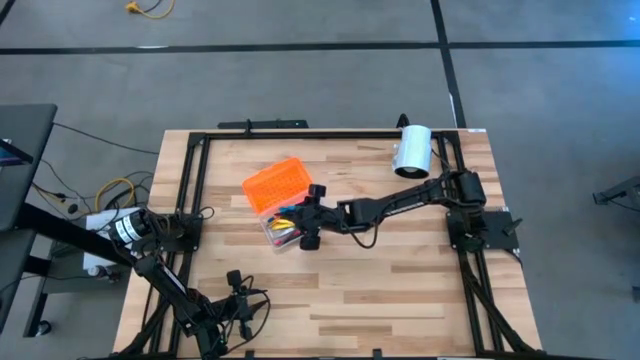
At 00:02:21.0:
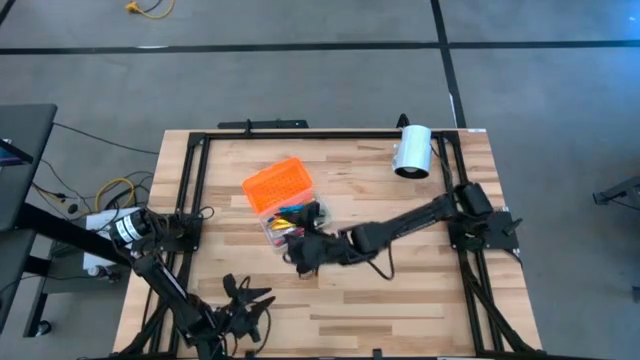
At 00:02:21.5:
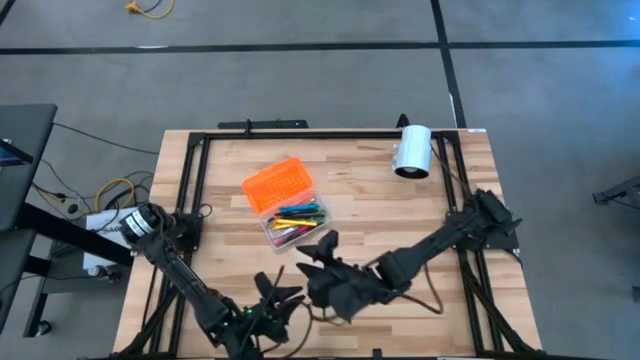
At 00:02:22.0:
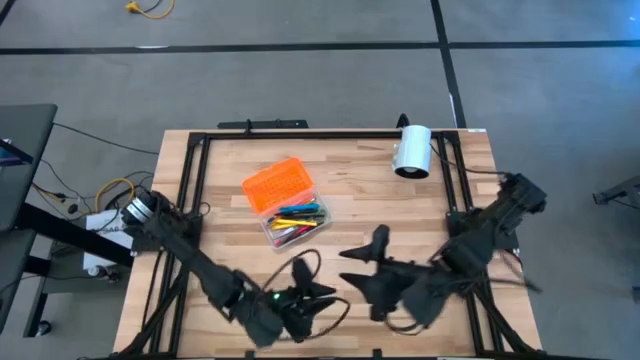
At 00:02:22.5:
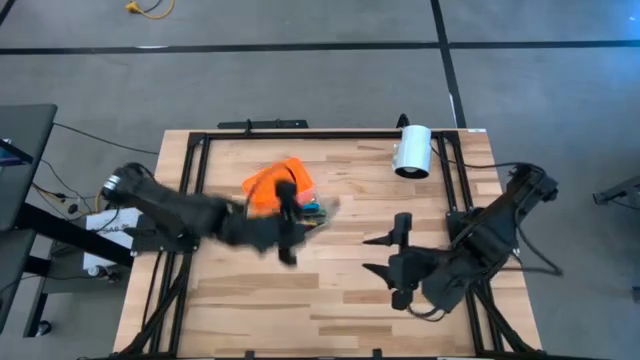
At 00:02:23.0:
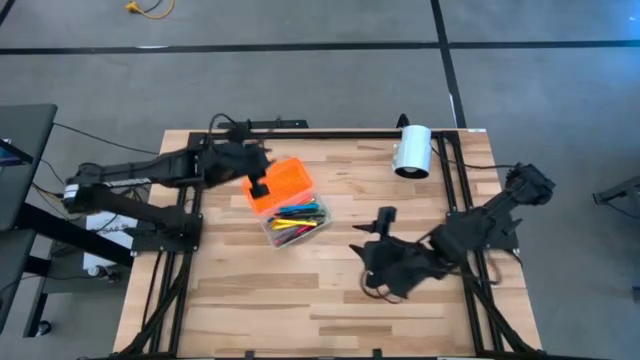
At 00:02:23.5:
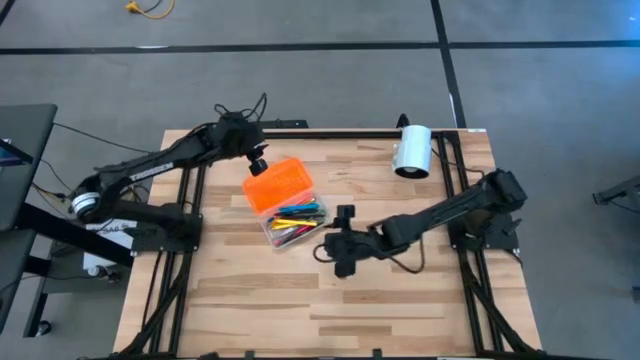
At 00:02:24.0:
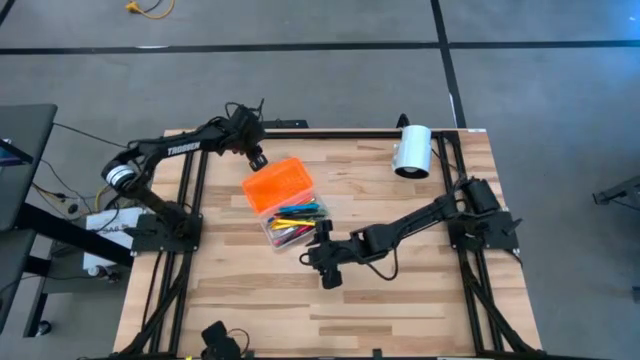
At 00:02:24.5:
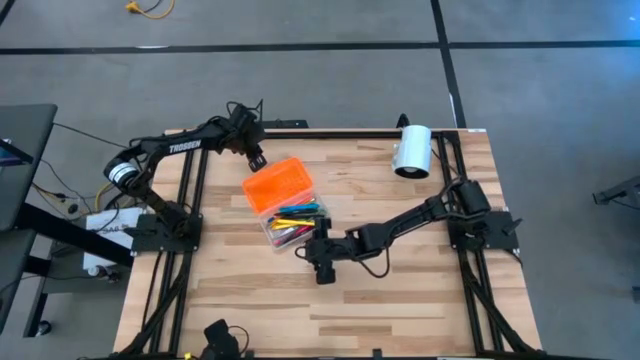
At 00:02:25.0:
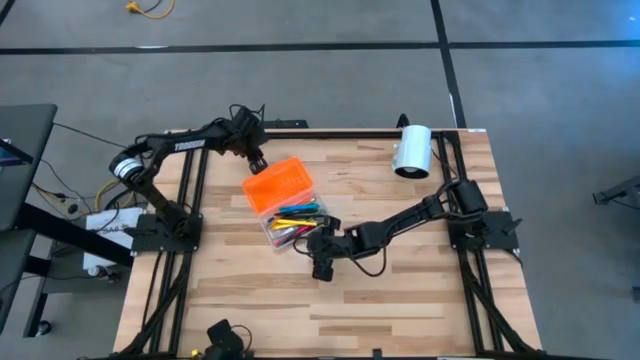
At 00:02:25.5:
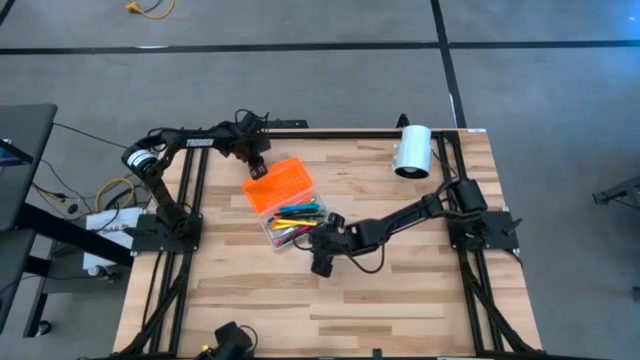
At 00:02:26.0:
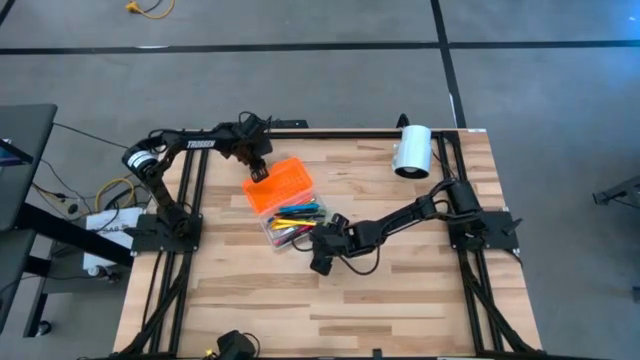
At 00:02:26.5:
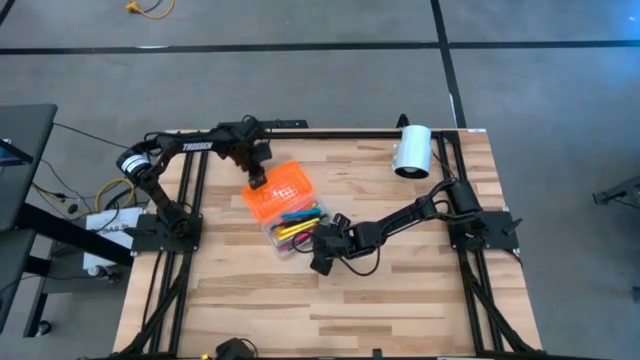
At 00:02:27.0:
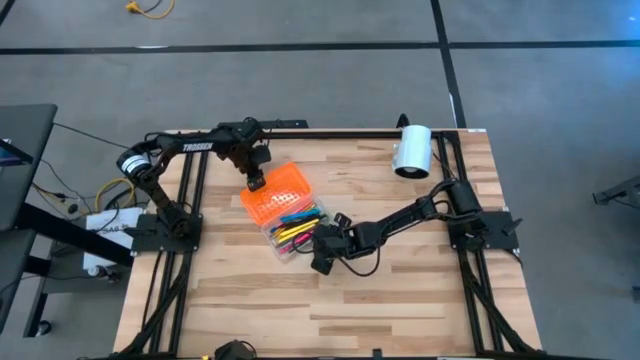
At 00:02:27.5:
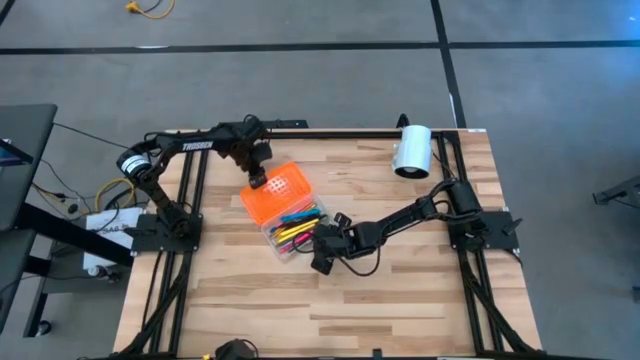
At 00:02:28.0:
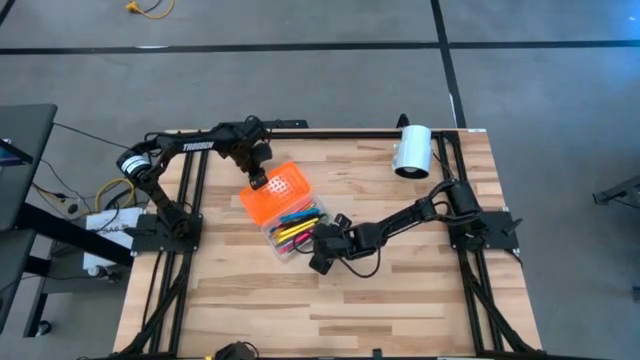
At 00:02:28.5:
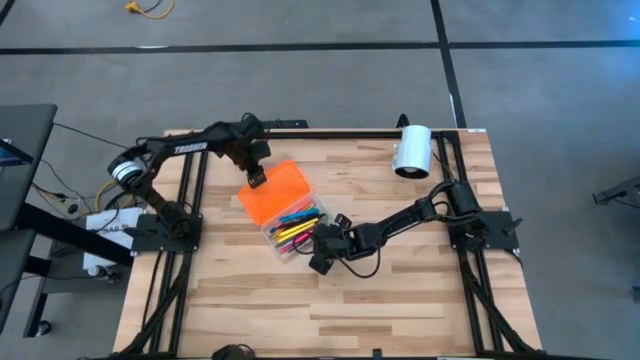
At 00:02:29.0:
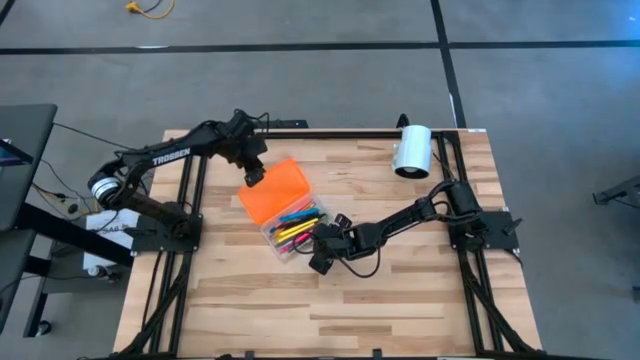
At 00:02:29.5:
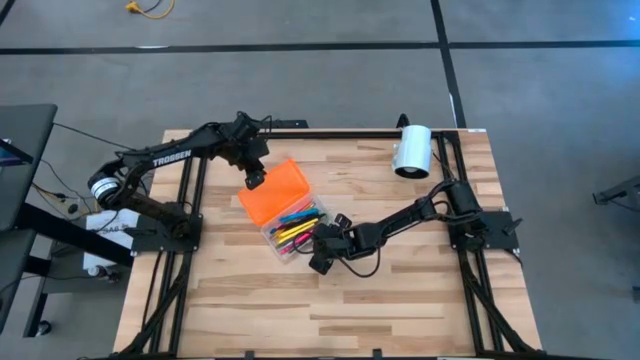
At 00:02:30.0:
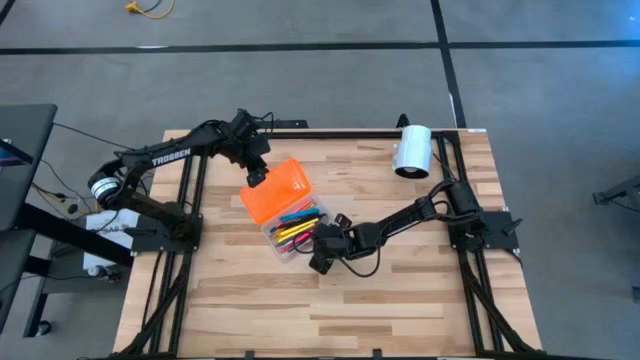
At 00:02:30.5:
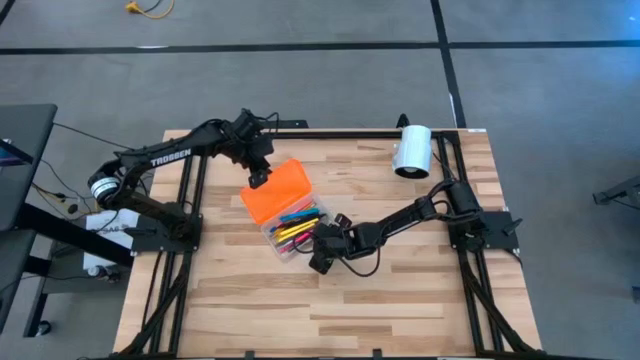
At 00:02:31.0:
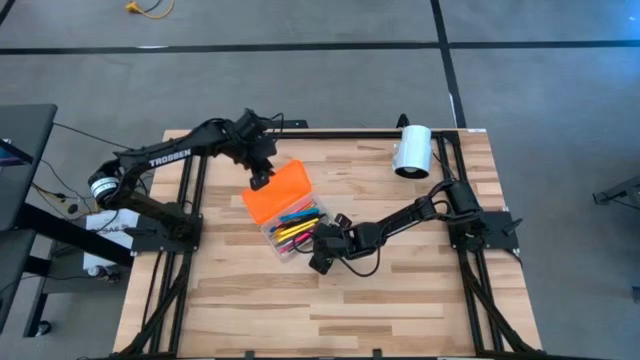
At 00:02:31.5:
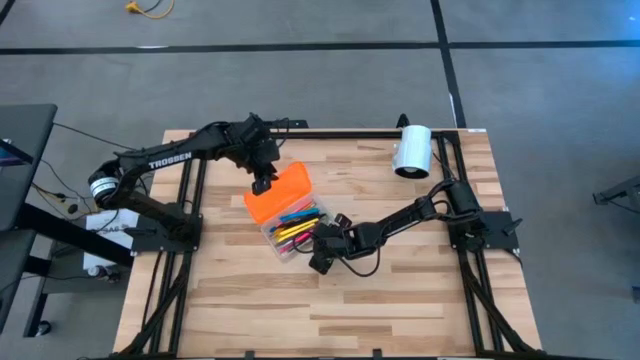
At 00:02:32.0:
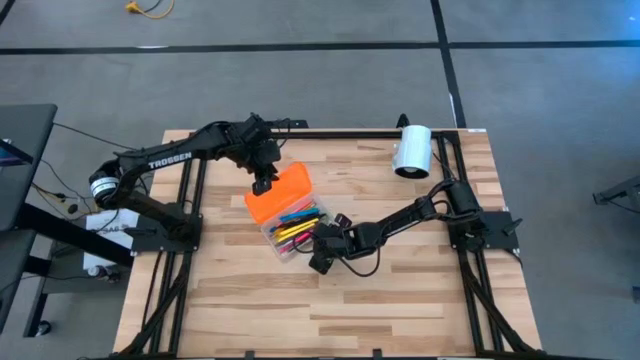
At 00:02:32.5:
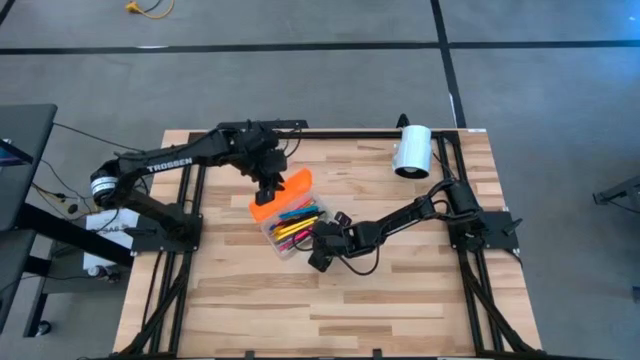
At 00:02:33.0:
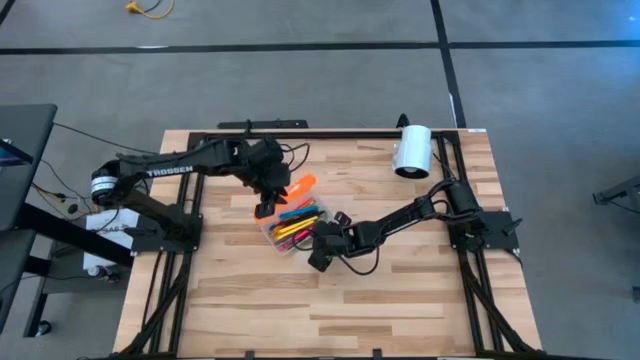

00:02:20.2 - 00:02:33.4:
Task: Pick & place school supplies into a supply box
Close the supply box

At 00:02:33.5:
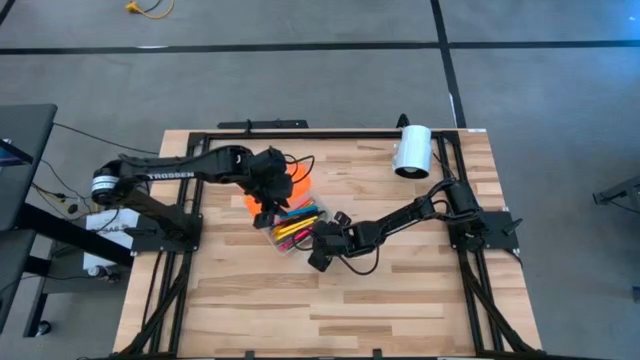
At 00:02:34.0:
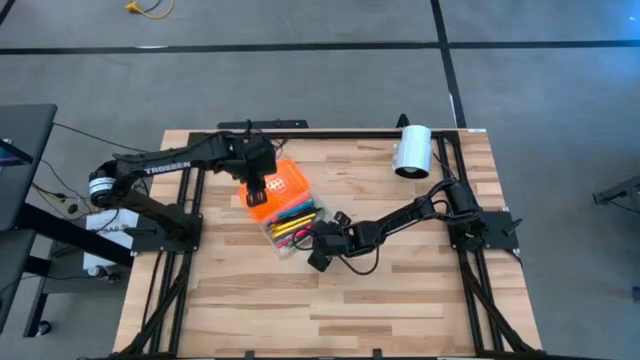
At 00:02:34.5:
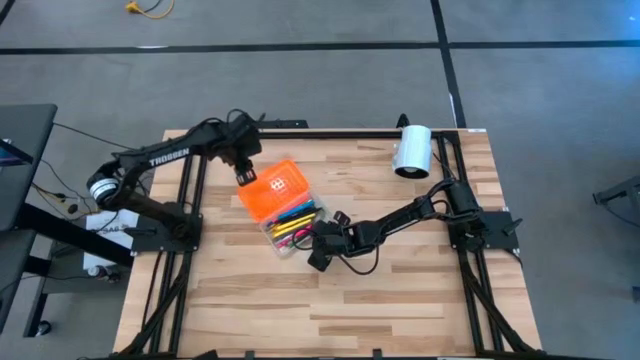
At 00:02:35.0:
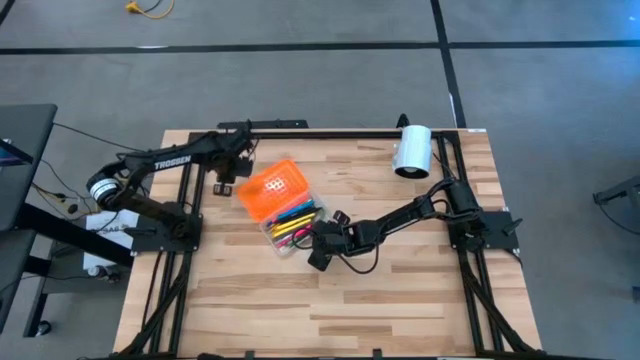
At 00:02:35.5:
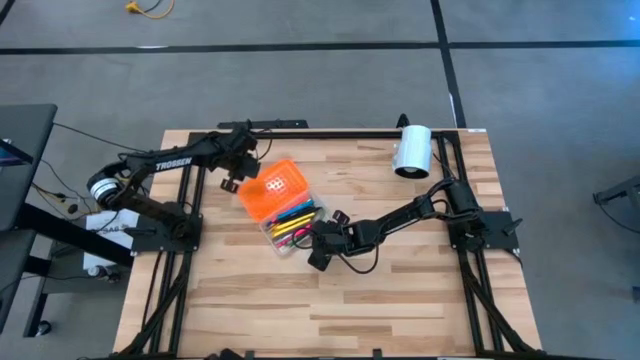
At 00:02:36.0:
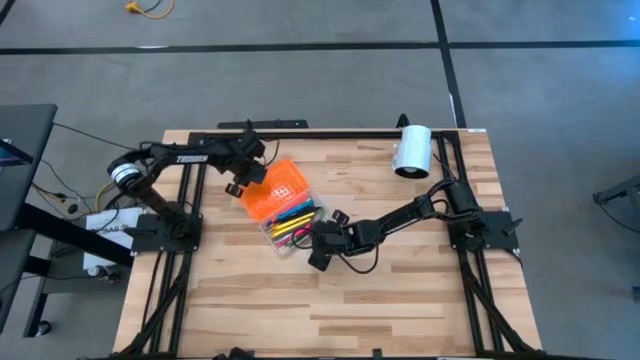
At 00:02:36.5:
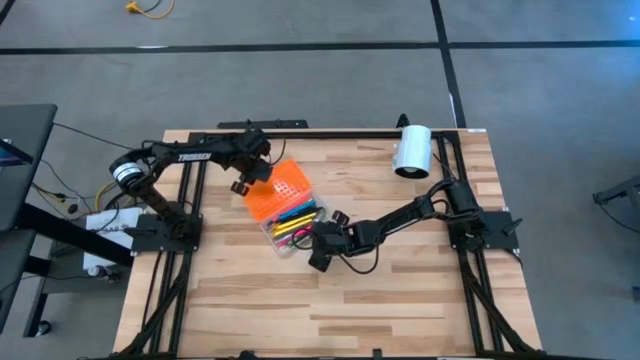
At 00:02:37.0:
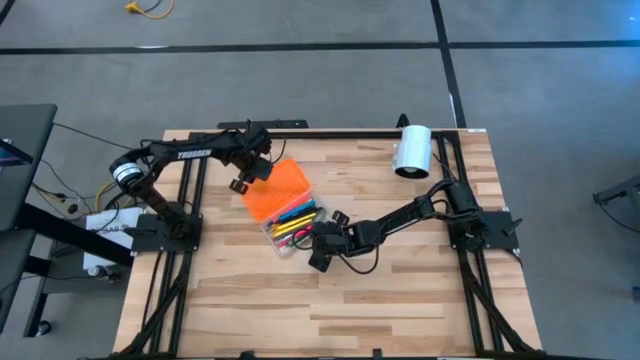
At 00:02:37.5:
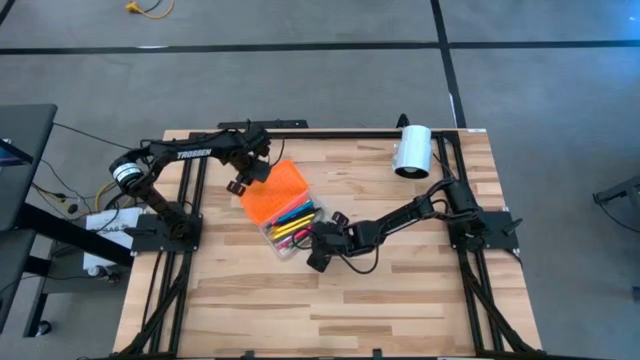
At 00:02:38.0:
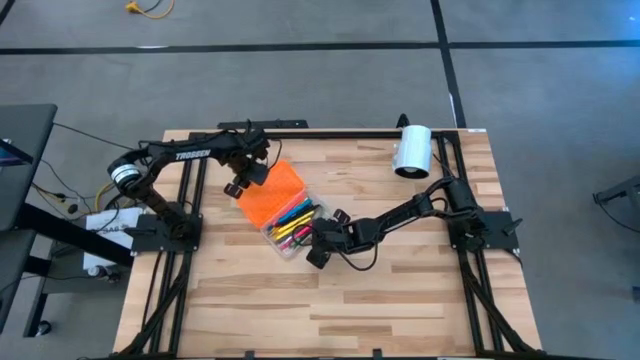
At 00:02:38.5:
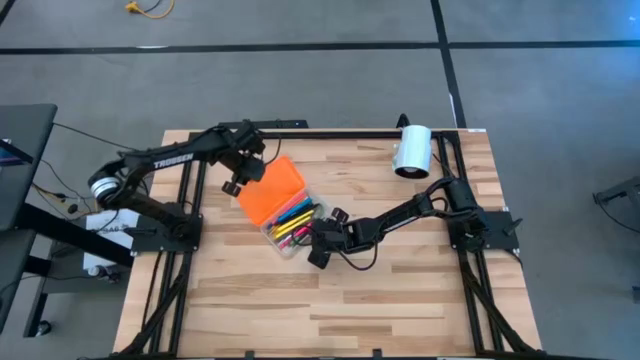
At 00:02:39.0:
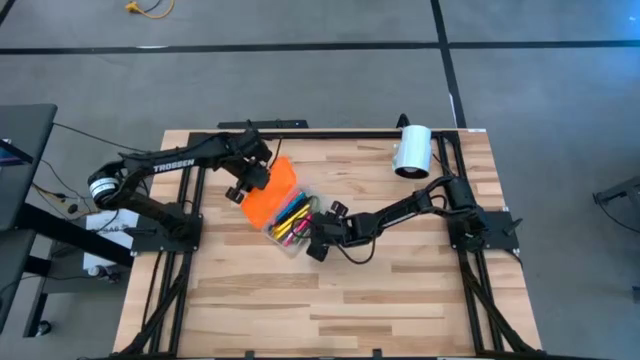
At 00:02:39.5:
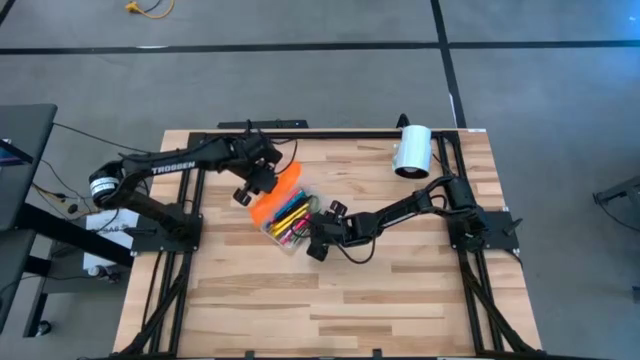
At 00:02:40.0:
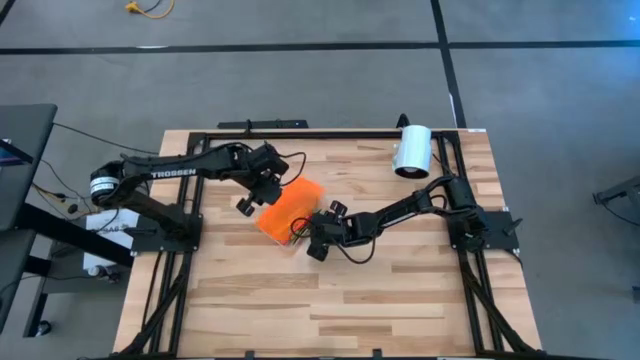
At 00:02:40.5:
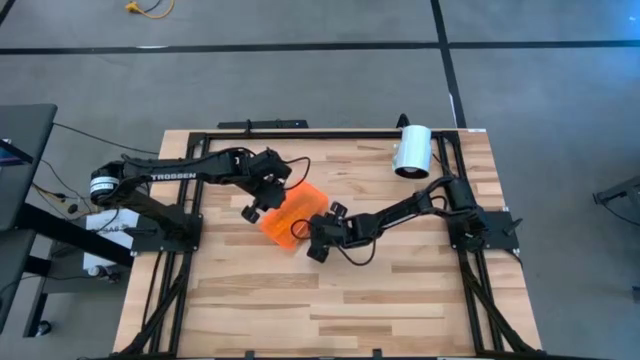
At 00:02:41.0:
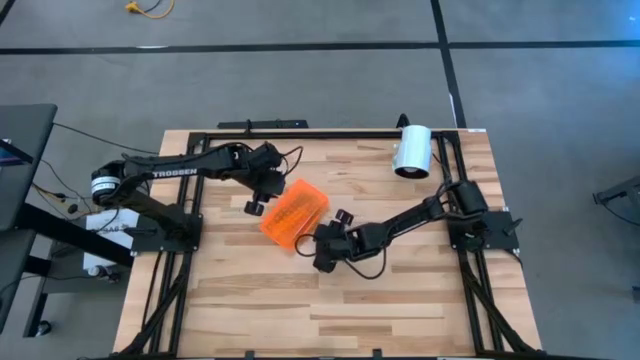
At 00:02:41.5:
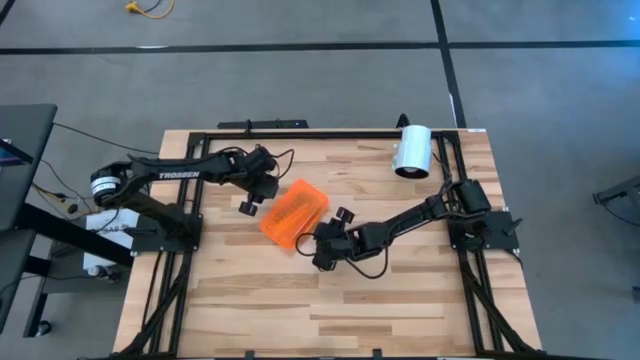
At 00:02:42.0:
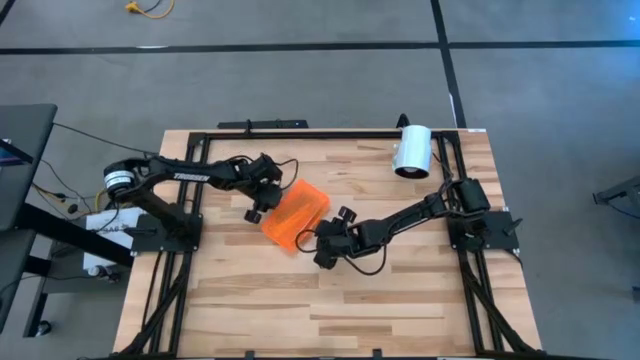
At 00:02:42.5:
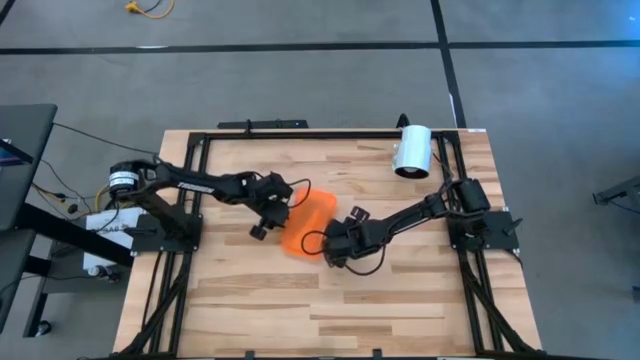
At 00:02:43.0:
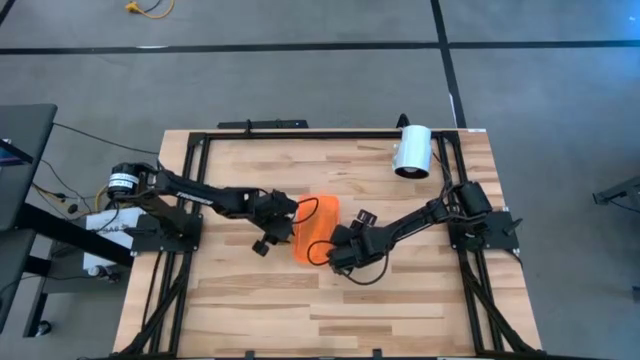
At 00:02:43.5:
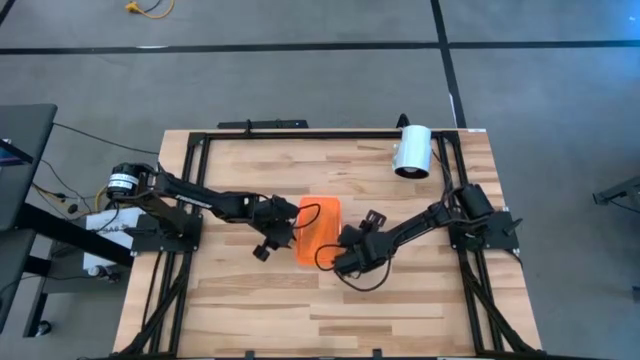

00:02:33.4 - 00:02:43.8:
Close the supply box
